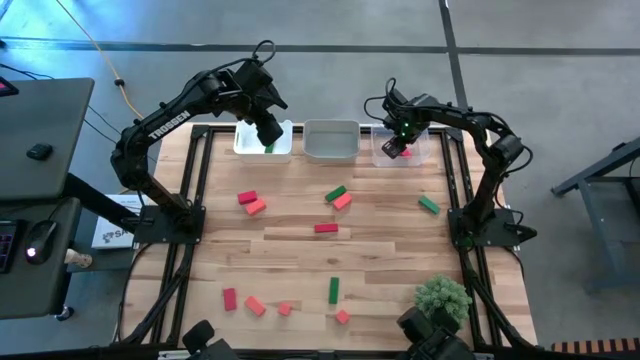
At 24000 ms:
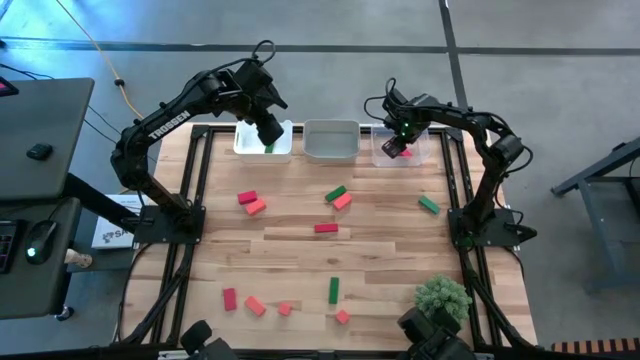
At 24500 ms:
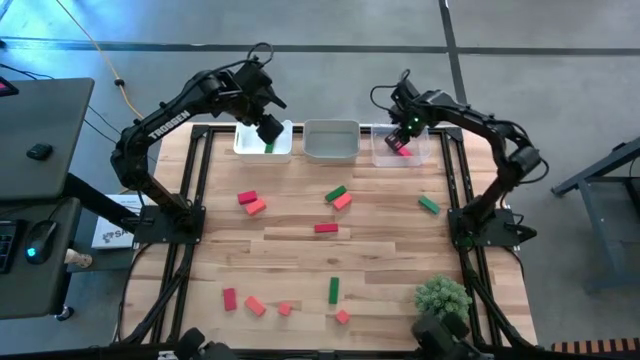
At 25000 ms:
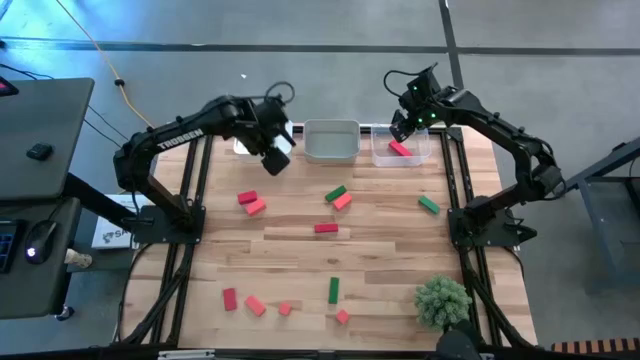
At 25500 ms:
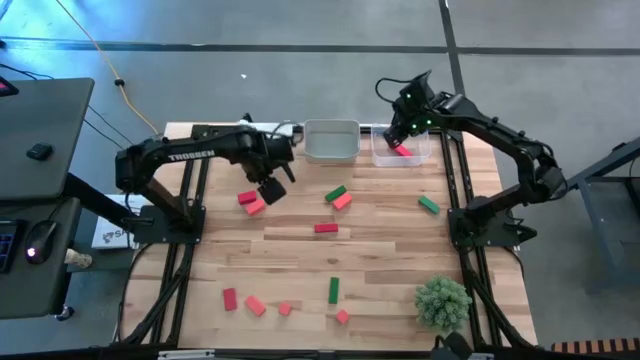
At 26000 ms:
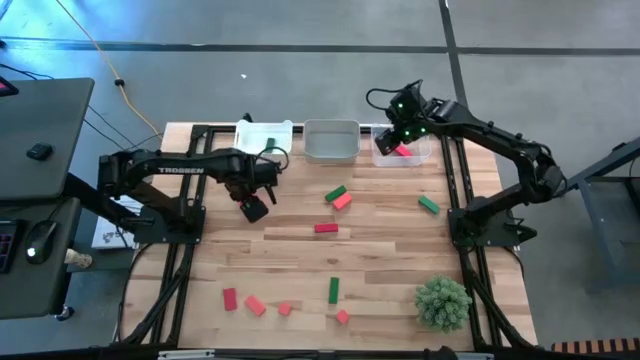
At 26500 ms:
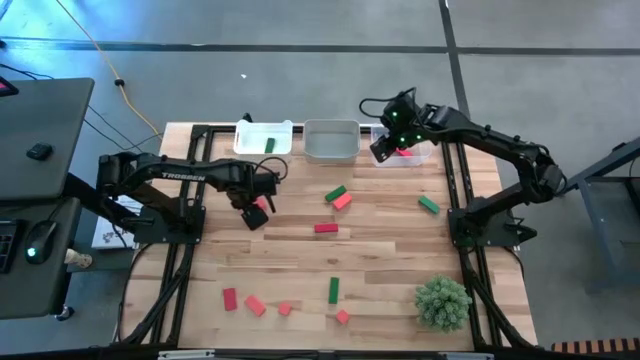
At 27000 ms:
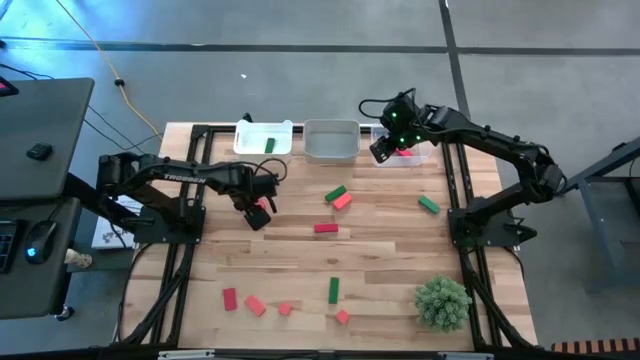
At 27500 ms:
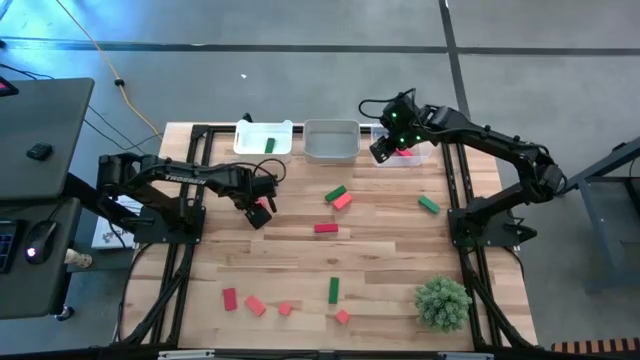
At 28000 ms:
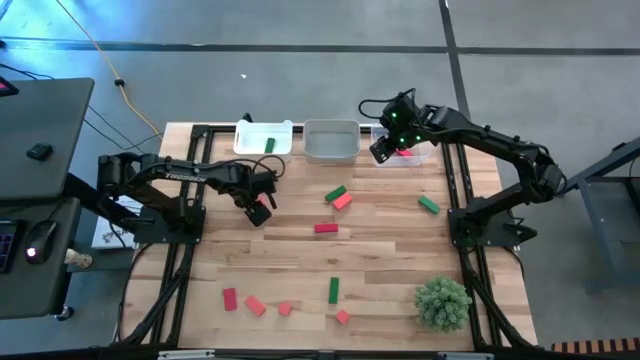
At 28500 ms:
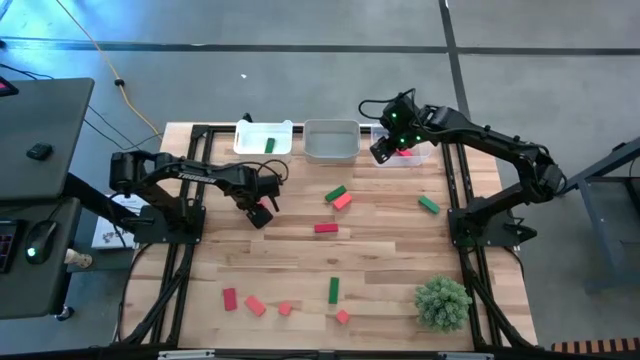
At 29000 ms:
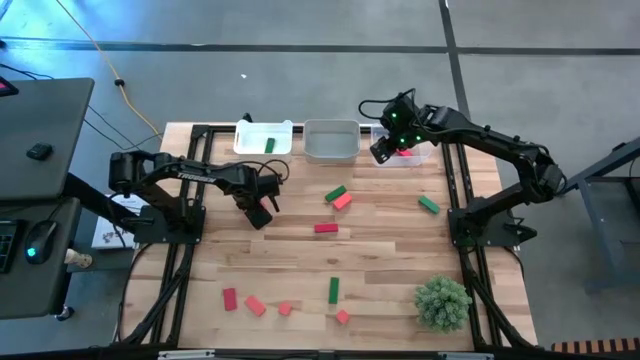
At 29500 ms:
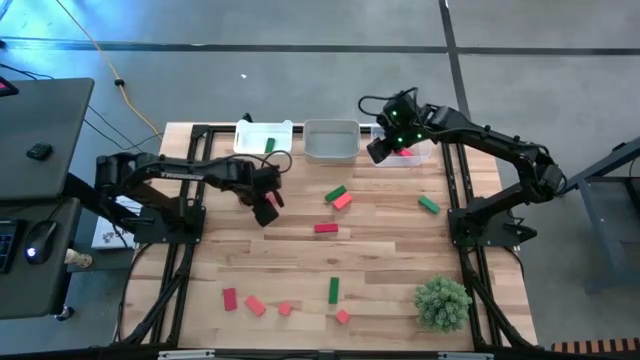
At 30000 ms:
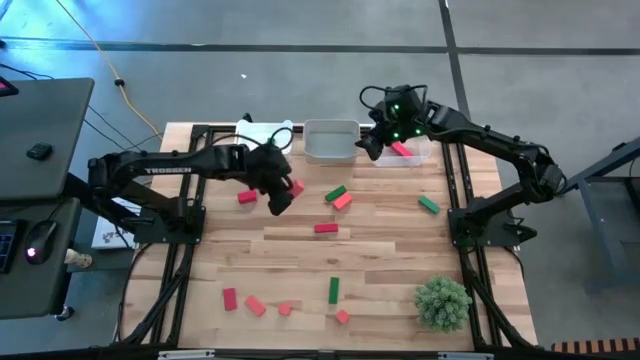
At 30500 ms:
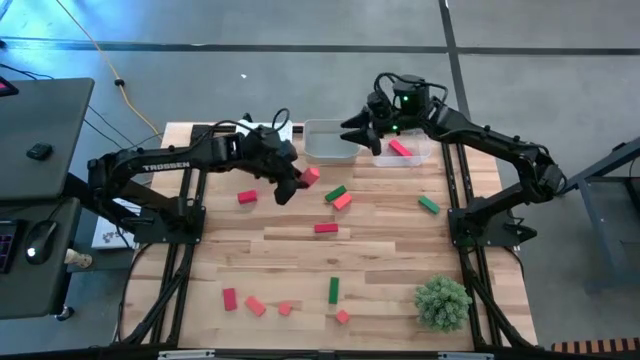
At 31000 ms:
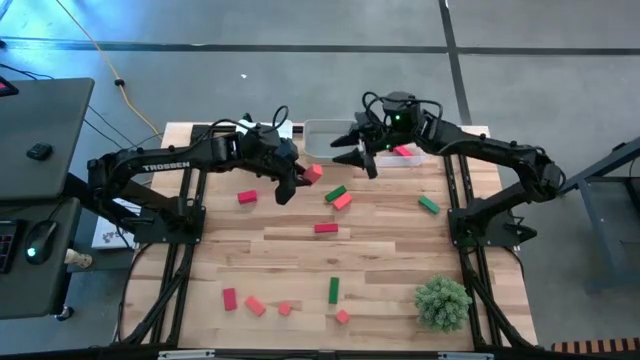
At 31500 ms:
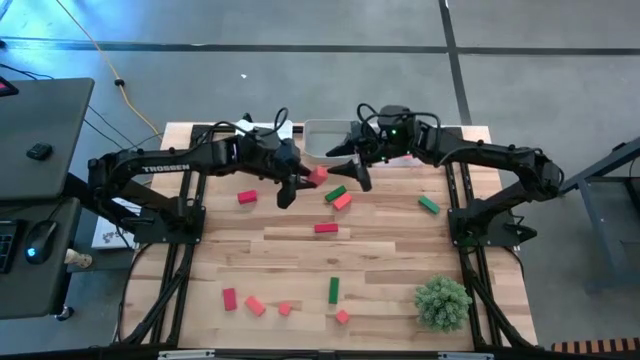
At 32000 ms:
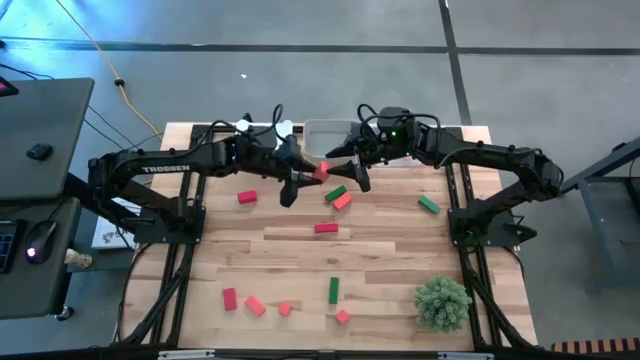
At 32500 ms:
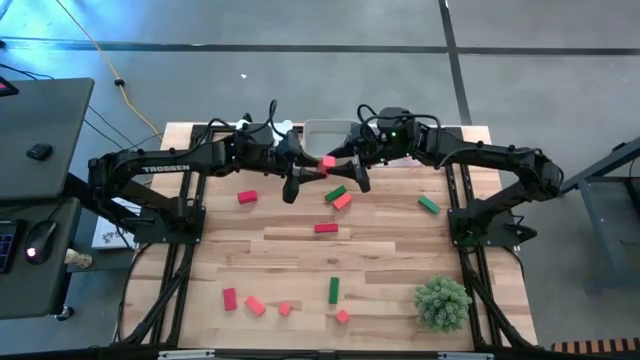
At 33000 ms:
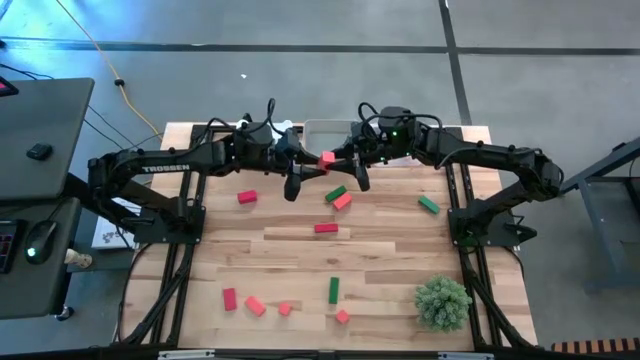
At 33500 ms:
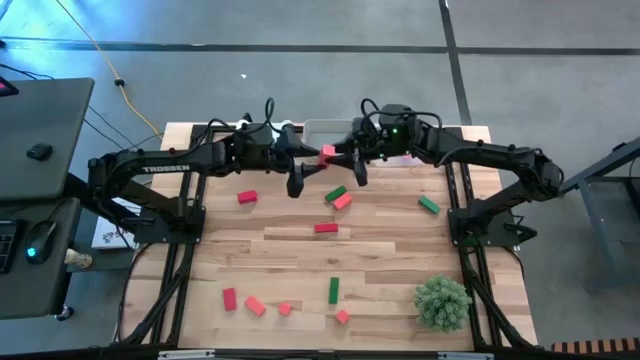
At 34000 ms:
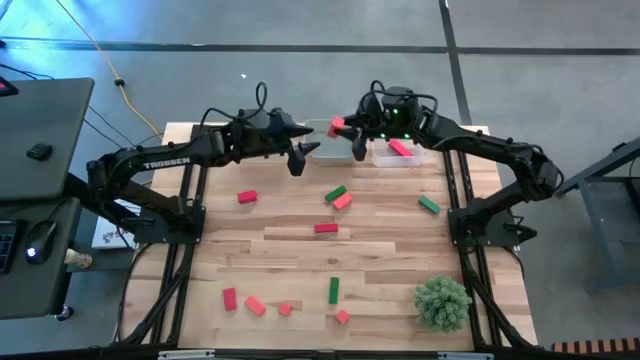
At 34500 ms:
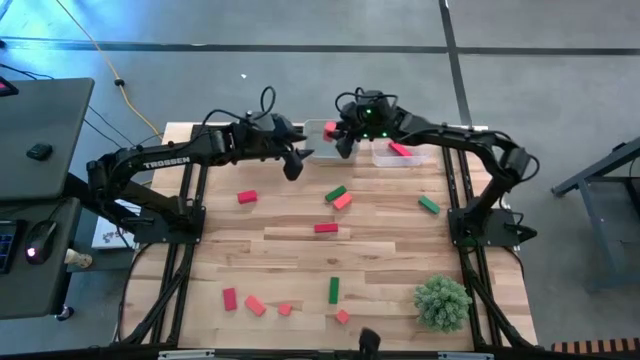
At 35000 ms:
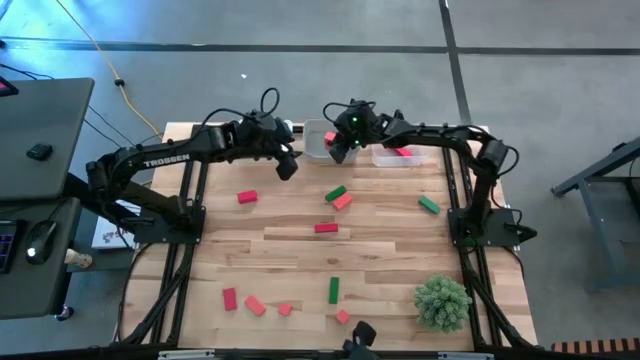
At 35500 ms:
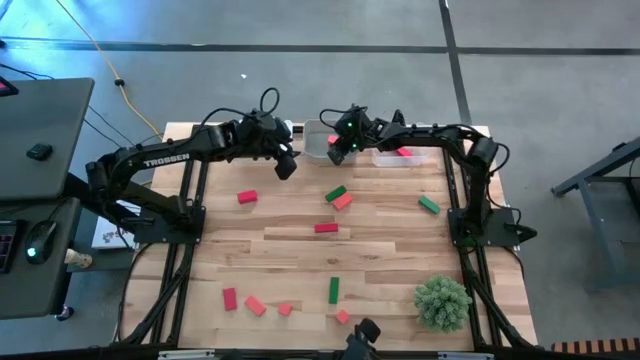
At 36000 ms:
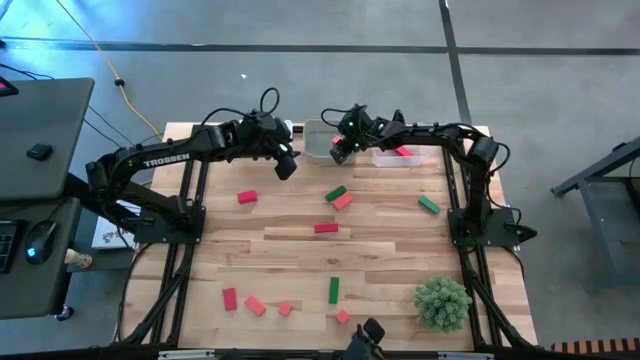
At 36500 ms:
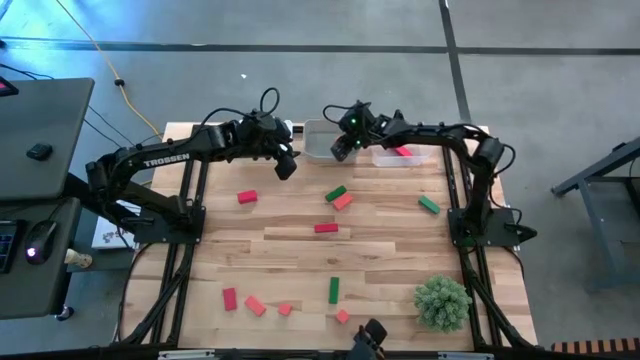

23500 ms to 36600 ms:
Task: Sort & place blocks by color
Put the orange wooden block into the gray bin

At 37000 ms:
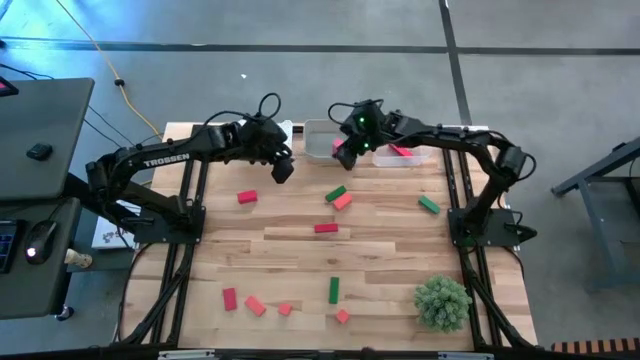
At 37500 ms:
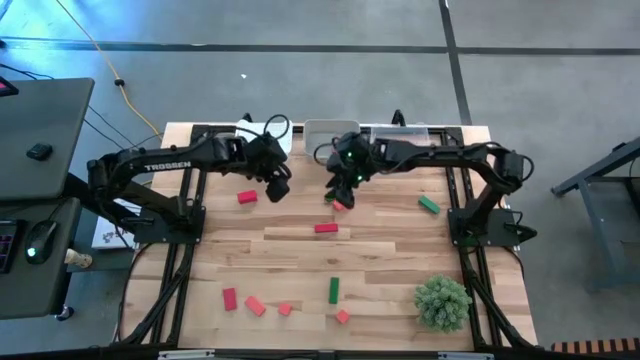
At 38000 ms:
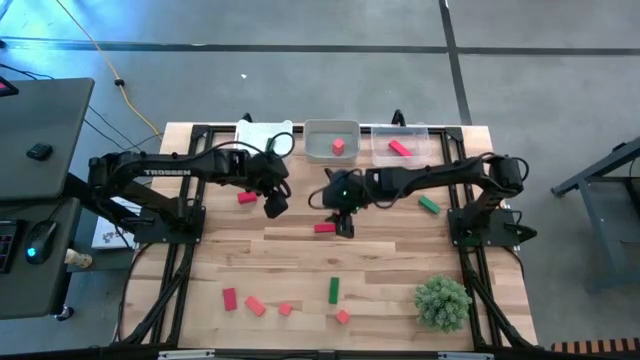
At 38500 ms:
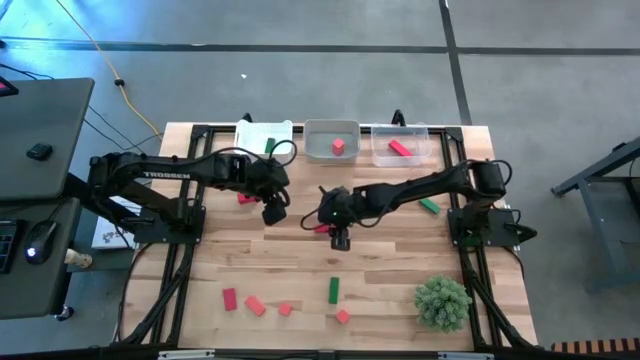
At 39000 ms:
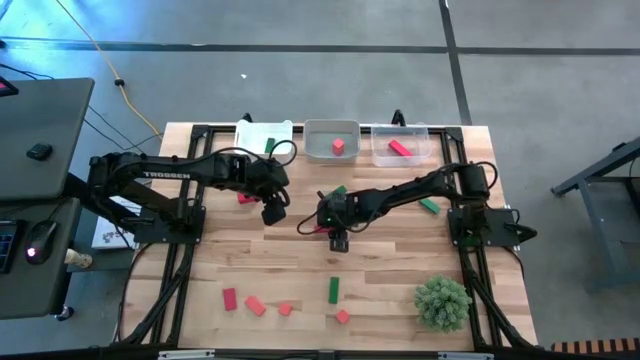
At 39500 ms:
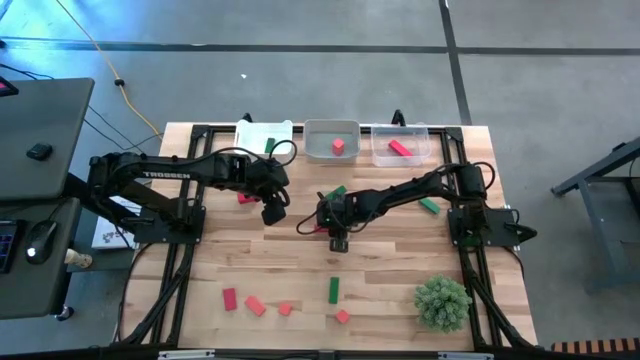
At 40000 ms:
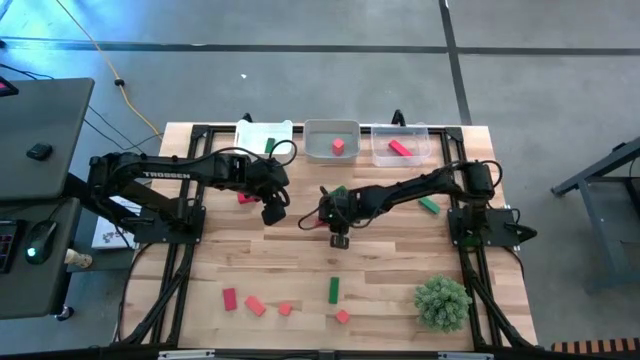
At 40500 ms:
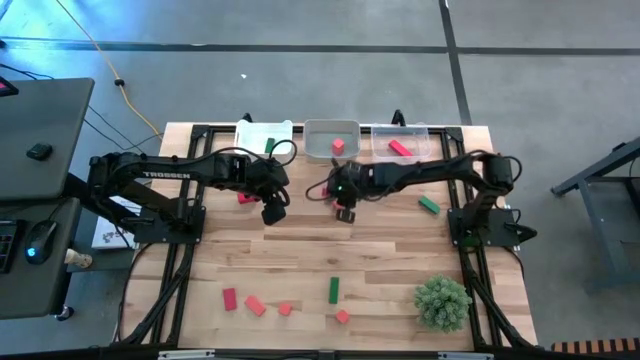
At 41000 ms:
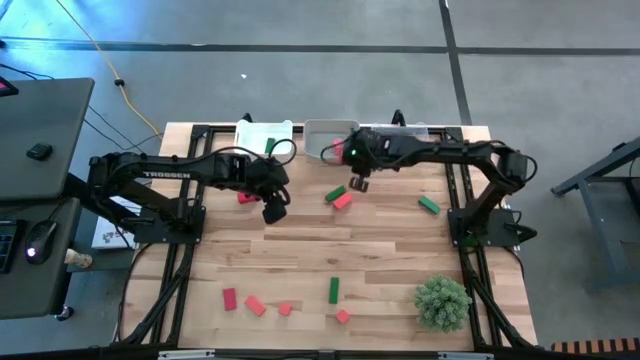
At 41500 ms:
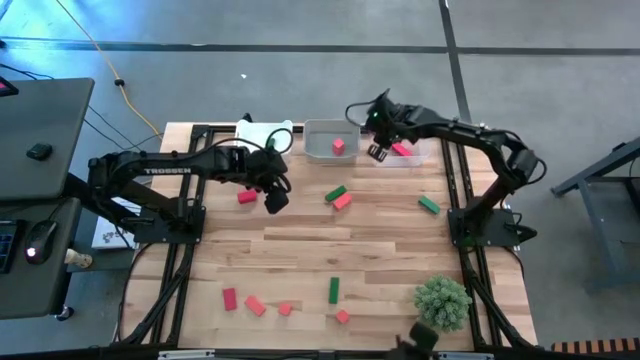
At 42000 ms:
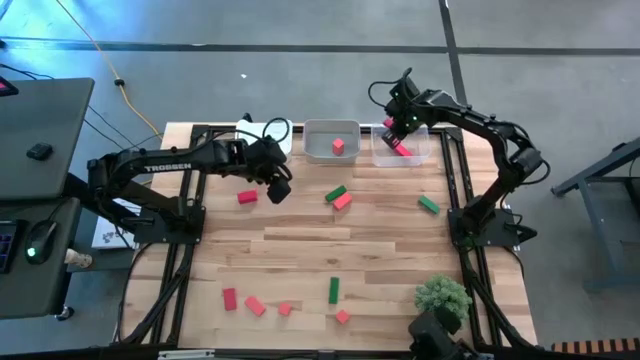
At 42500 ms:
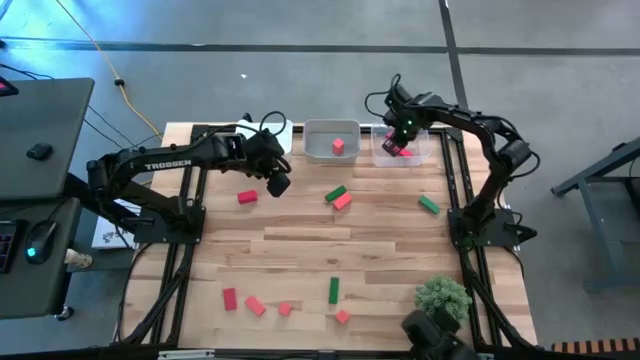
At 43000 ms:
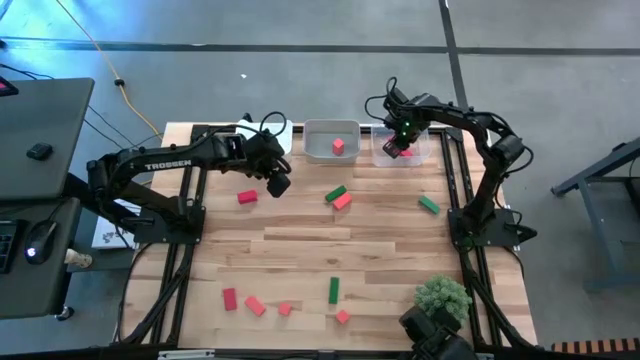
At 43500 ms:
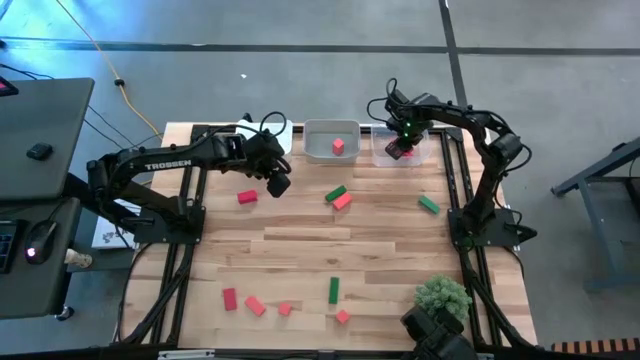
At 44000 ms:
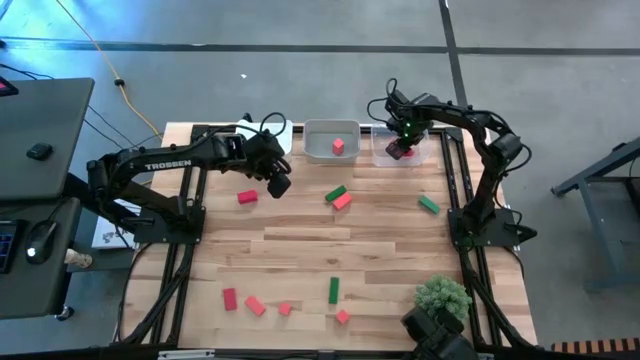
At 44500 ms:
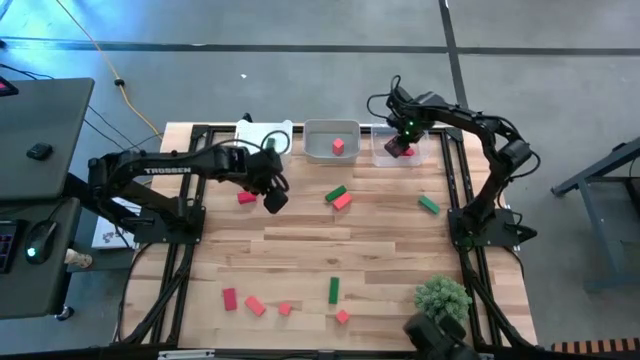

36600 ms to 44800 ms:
Put the red wooden block into the transparent bin
